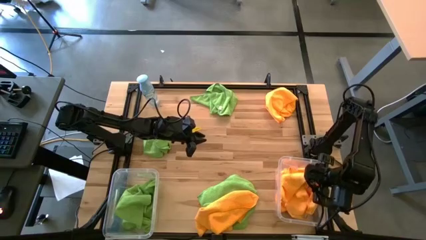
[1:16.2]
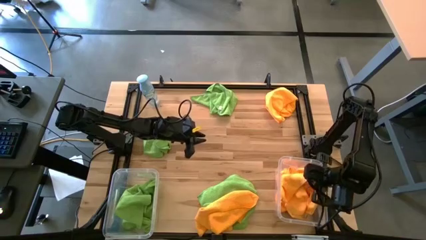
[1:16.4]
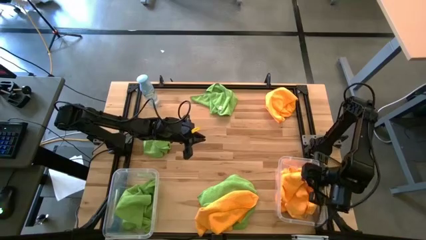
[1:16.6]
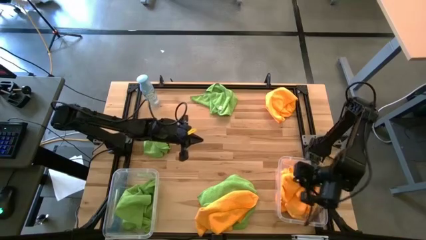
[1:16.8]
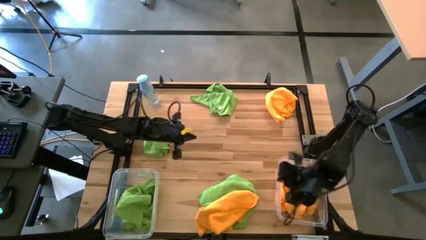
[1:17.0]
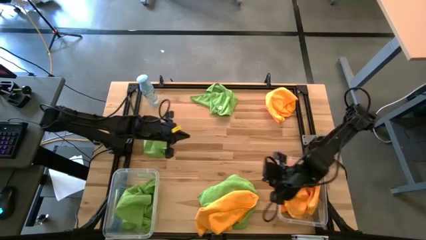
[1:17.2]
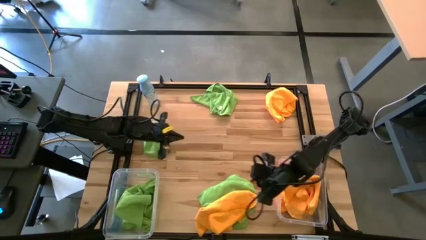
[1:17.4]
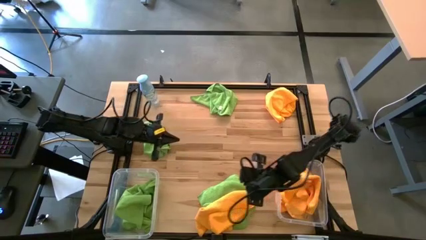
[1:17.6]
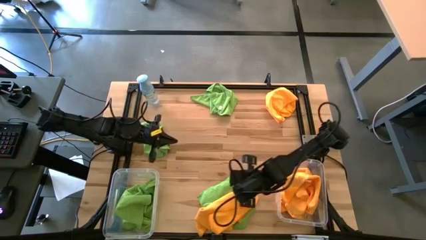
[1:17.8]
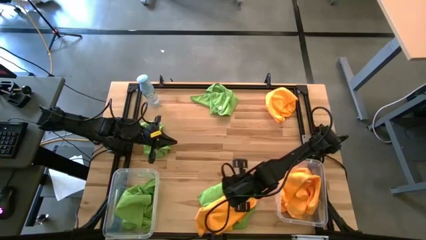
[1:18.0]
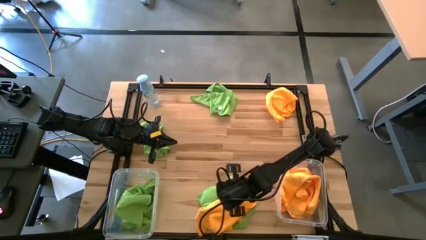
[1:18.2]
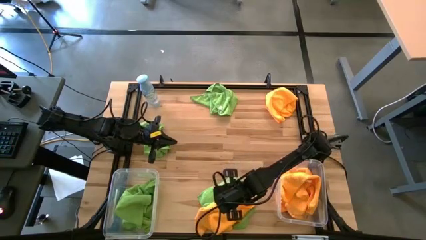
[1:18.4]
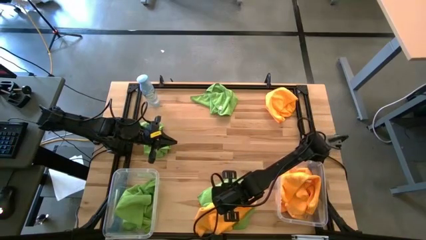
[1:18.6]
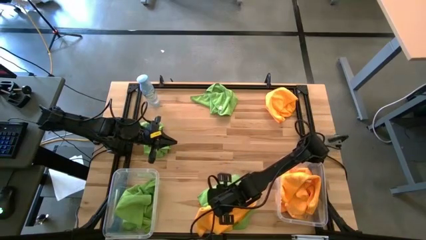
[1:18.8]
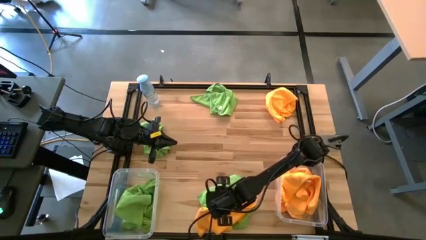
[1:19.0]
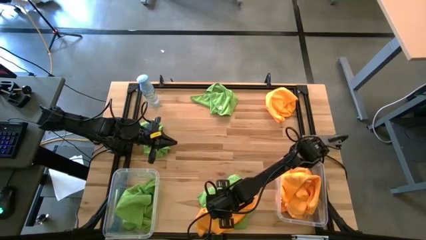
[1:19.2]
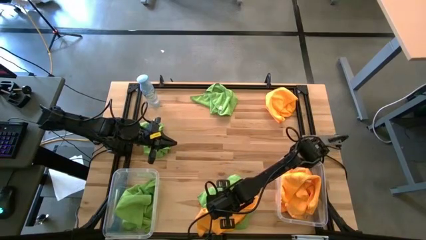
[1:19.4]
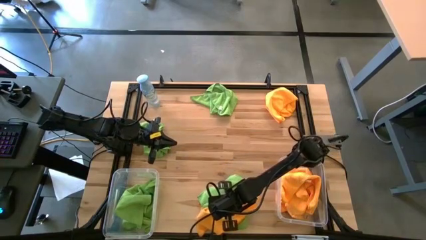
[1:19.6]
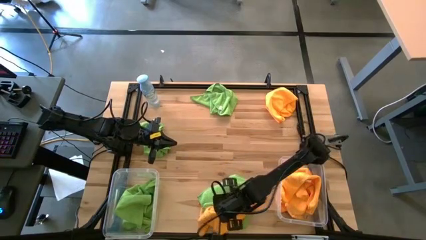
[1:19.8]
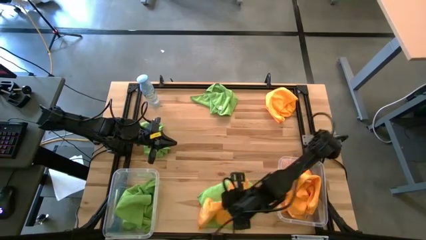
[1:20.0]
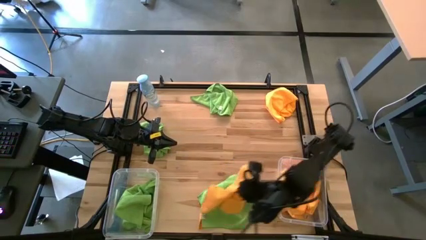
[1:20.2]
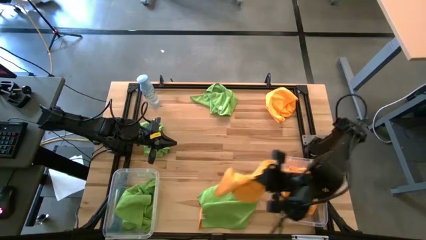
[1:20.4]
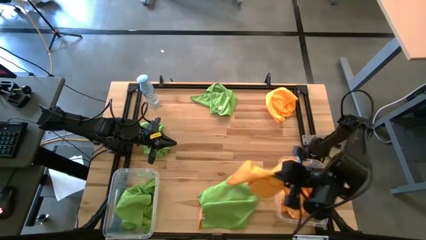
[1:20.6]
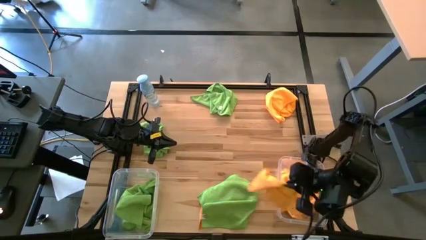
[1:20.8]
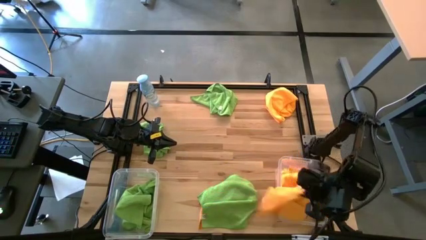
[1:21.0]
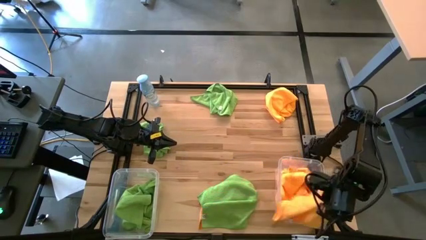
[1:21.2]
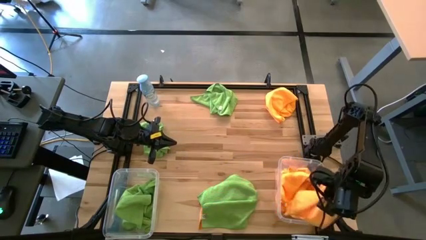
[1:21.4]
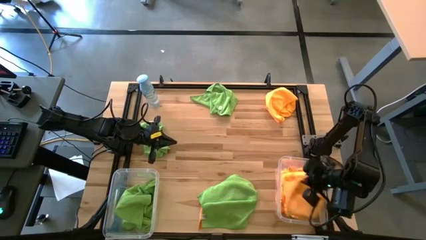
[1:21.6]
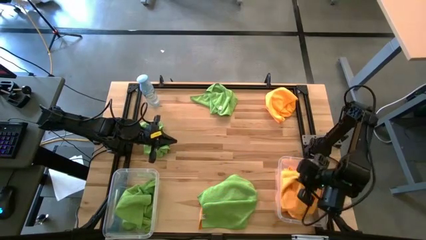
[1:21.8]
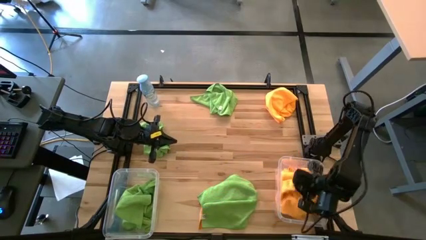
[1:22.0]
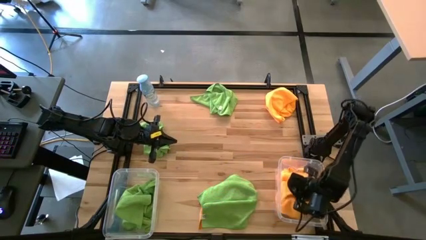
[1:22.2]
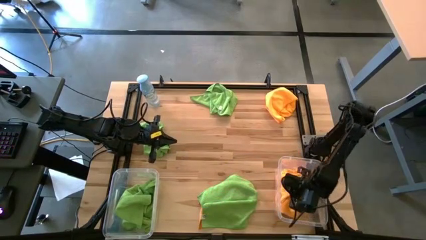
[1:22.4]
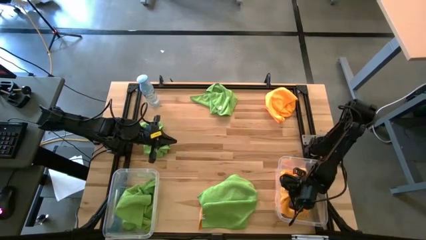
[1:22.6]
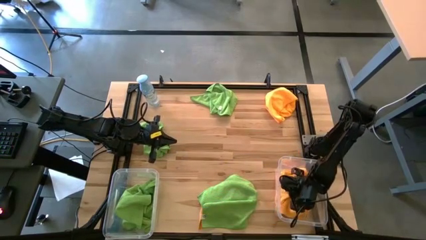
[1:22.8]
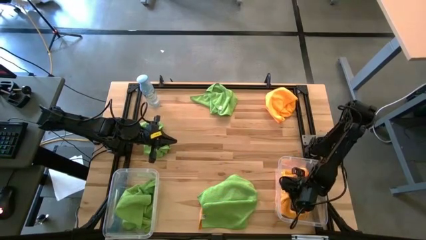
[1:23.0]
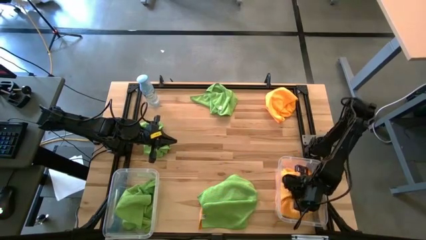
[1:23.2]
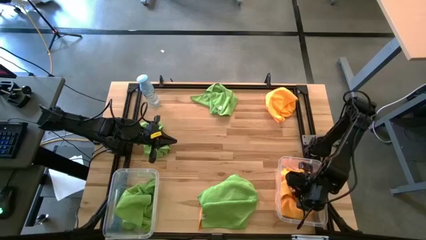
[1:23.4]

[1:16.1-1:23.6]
Task: Sort microfiber towel by color & place in baskets
Put the yellow towel into the right transparent bin

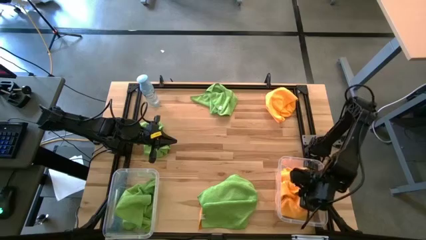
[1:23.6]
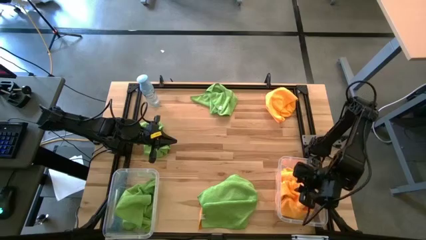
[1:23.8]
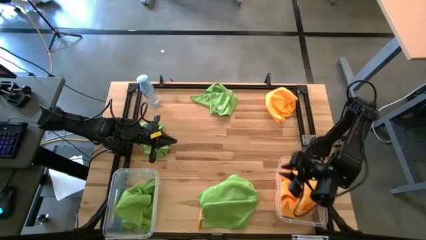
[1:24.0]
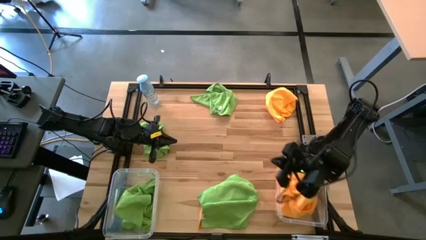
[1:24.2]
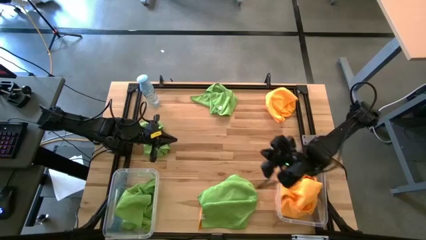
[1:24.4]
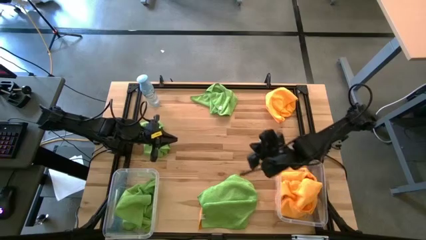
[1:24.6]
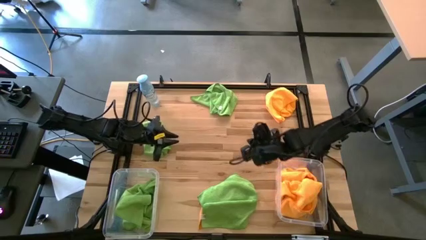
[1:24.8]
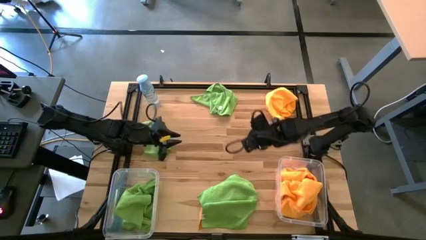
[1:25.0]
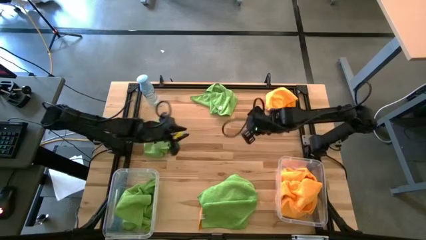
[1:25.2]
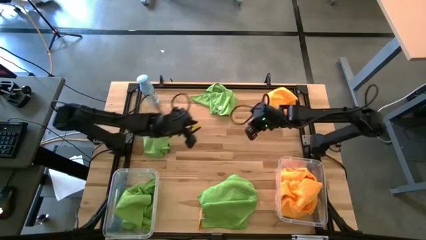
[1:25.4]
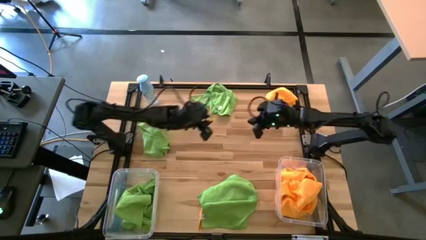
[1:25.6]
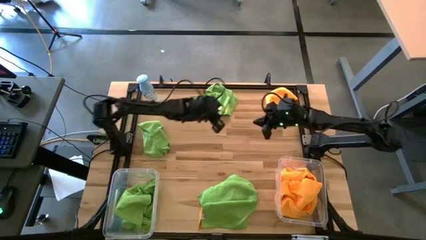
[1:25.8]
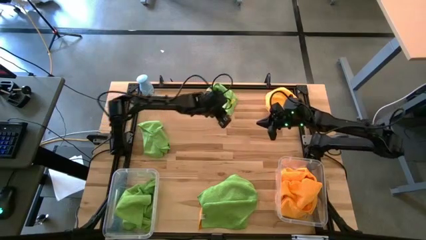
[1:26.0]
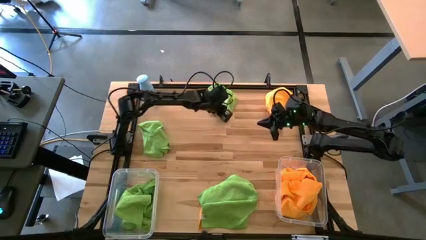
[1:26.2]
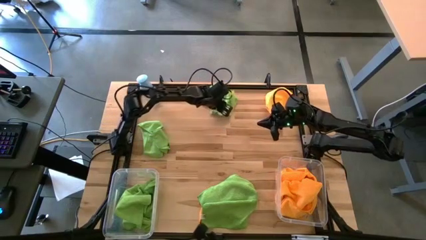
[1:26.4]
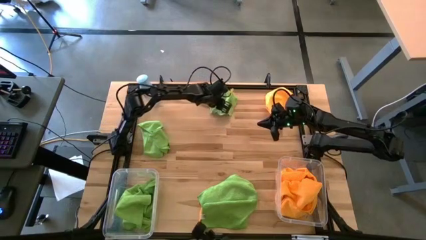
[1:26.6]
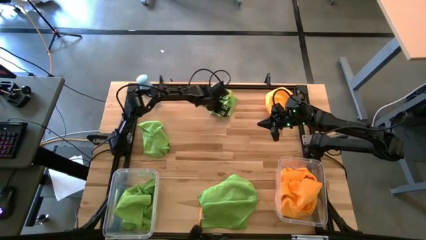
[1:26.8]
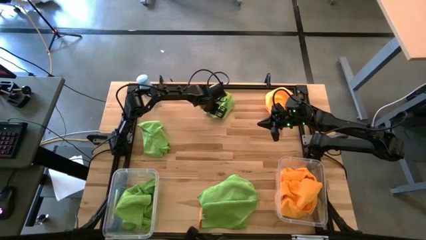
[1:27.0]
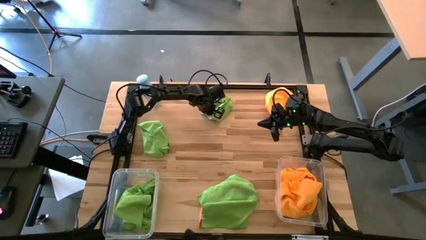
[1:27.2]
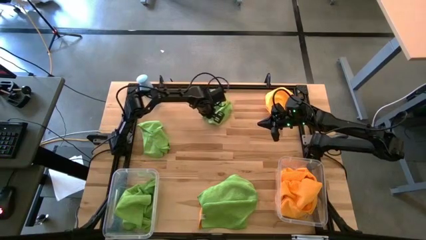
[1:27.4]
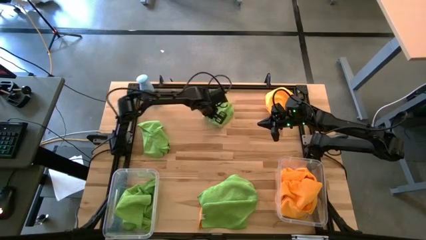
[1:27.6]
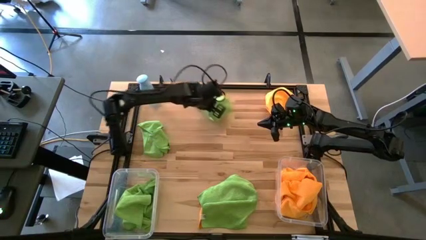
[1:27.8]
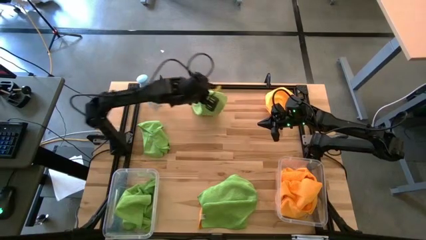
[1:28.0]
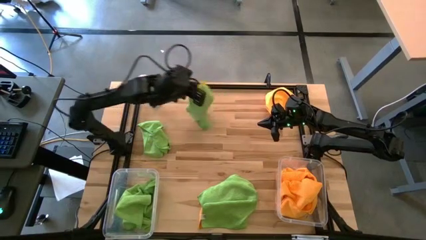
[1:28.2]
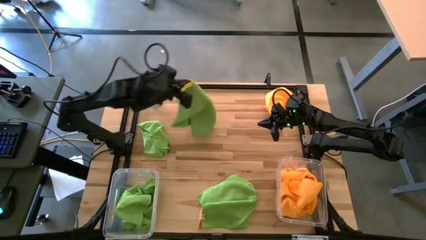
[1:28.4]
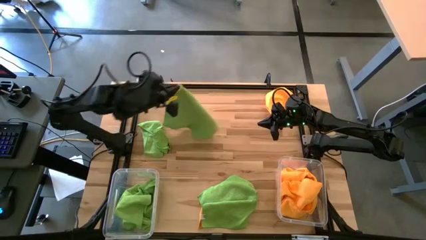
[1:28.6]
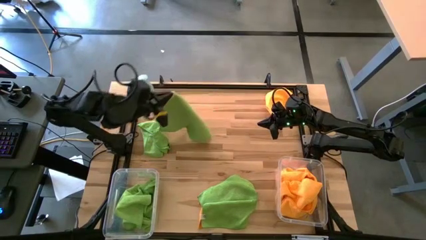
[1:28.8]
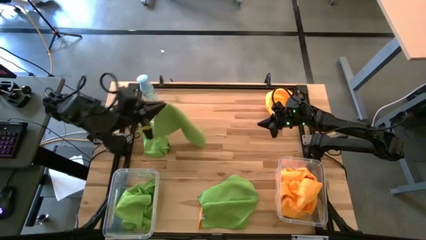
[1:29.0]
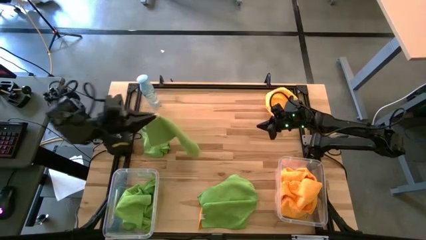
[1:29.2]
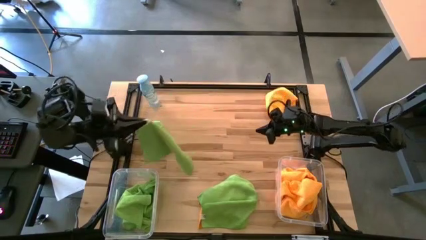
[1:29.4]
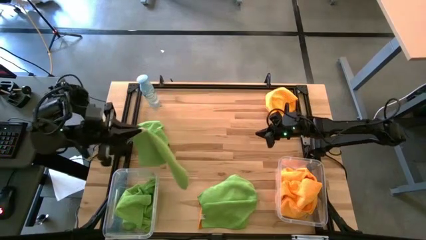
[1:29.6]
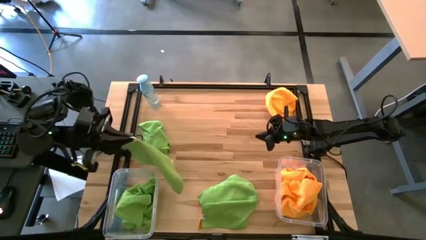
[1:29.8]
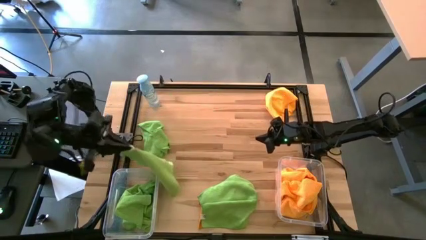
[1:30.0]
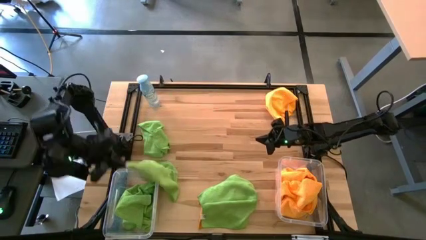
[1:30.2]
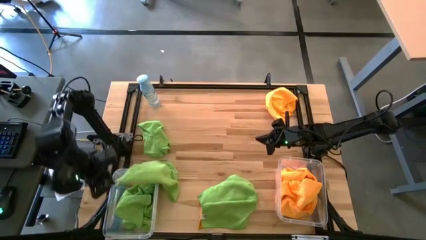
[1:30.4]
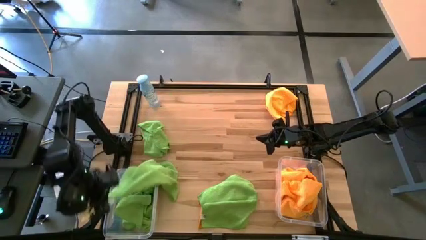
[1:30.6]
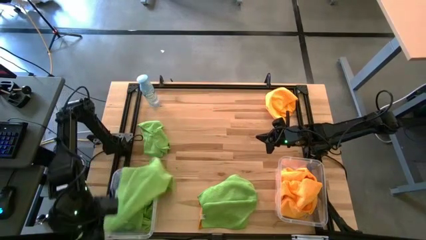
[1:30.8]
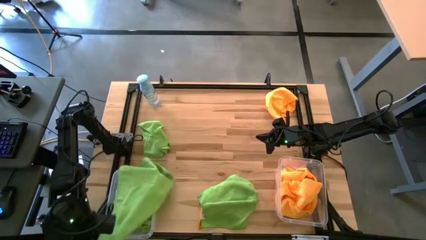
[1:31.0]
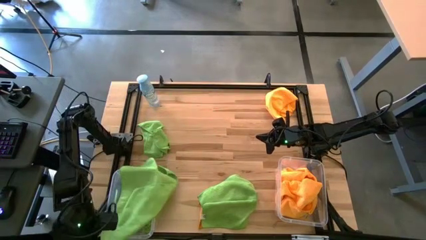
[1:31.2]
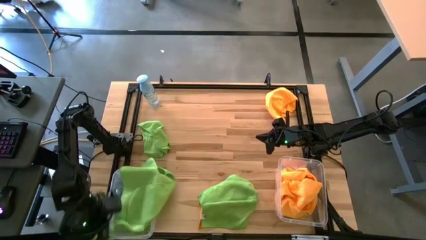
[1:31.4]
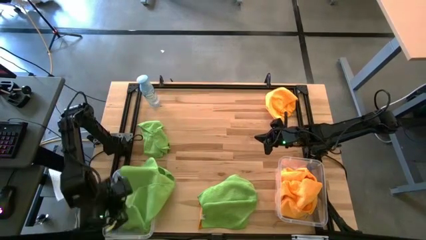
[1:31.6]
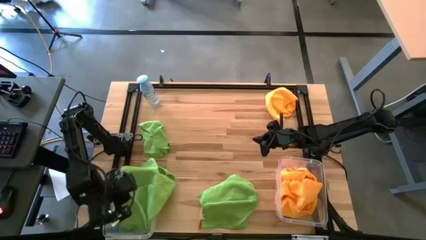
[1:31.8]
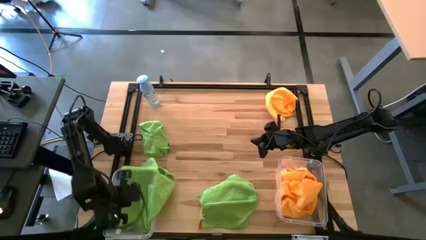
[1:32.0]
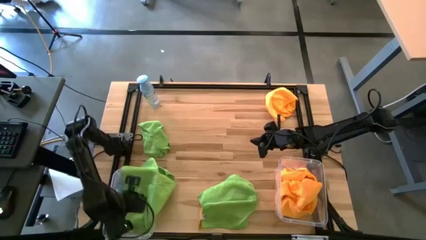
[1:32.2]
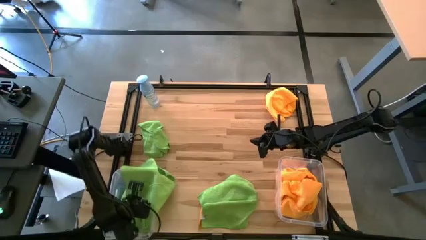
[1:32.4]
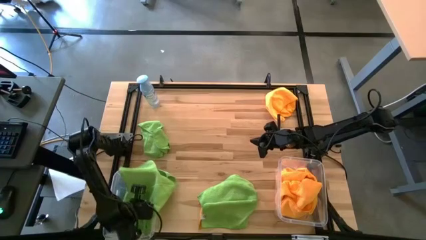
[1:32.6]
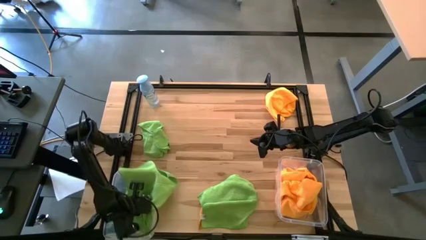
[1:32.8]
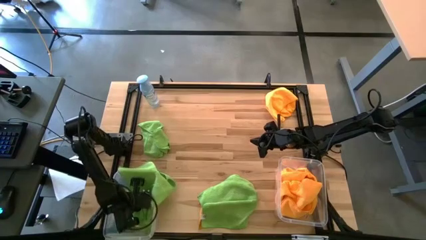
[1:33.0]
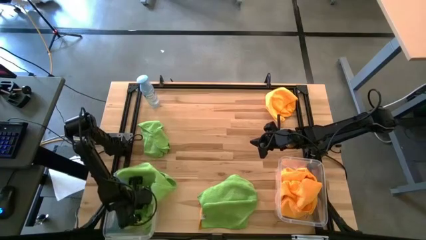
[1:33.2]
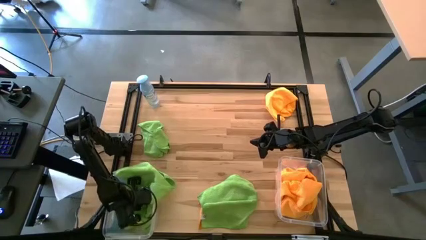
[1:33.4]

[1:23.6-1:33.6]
Put the green towel into the left transparent bin
